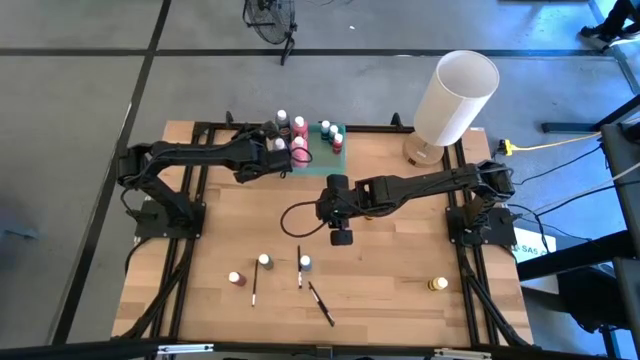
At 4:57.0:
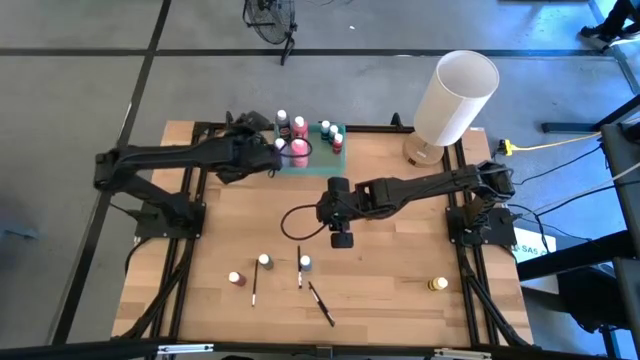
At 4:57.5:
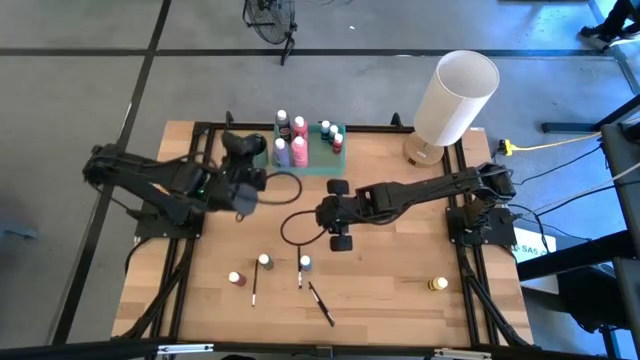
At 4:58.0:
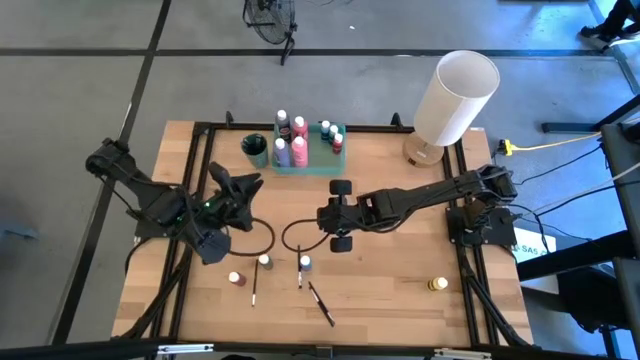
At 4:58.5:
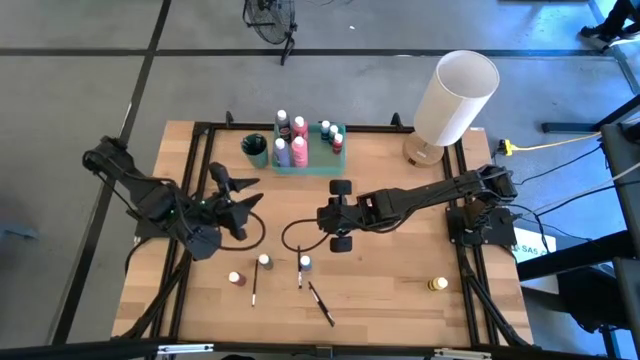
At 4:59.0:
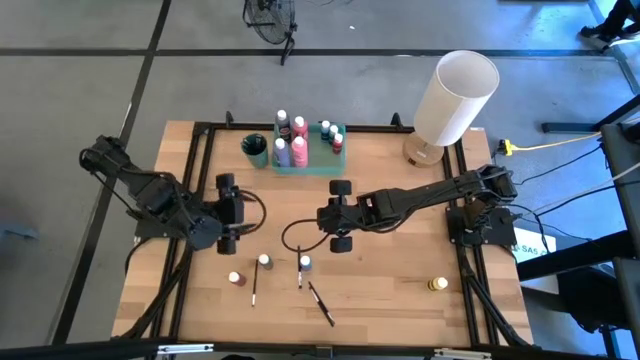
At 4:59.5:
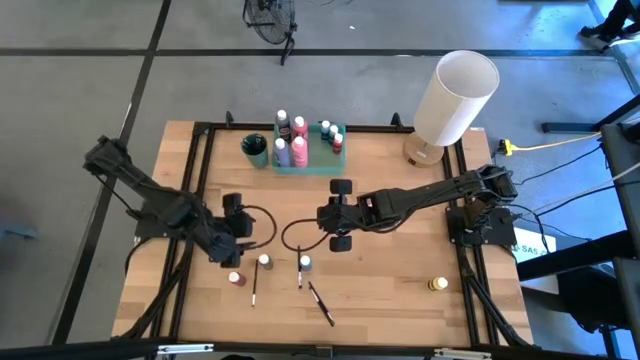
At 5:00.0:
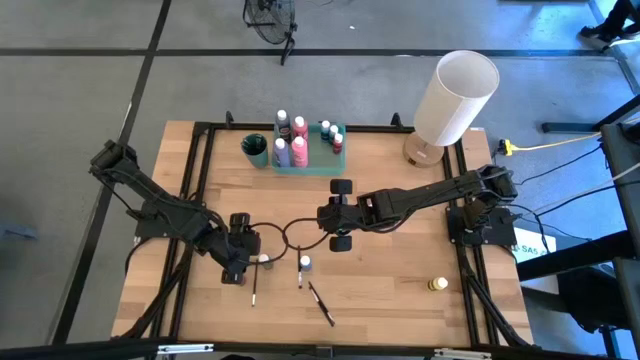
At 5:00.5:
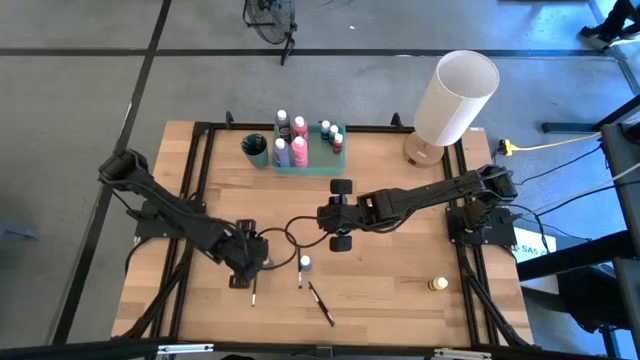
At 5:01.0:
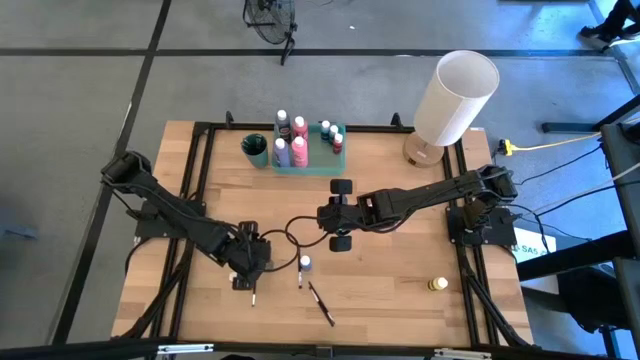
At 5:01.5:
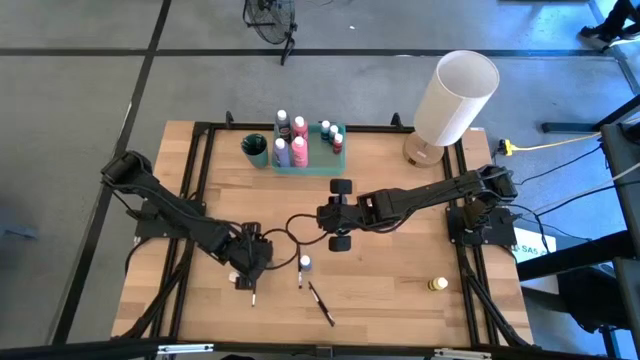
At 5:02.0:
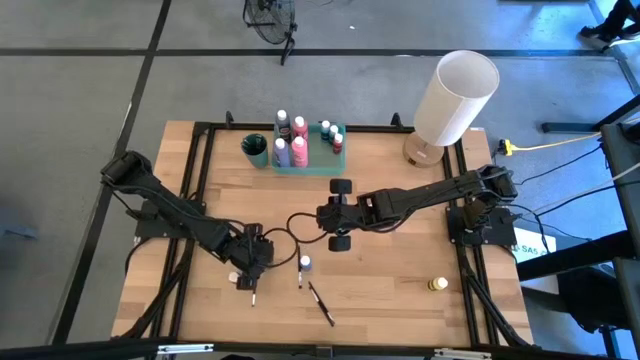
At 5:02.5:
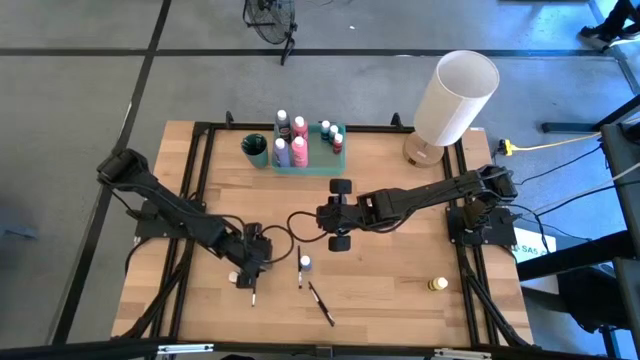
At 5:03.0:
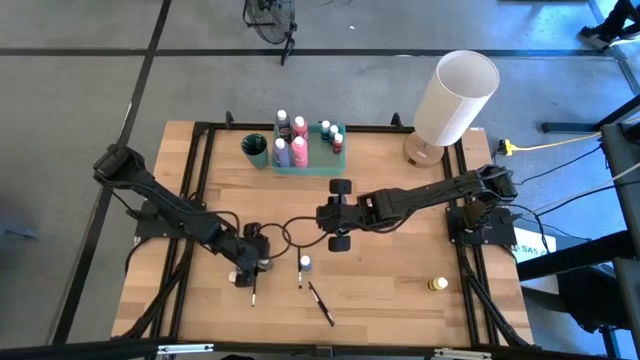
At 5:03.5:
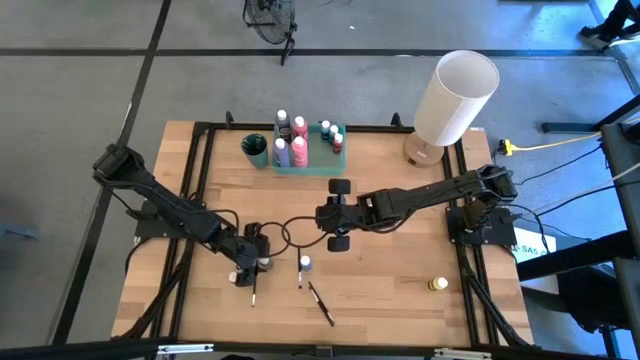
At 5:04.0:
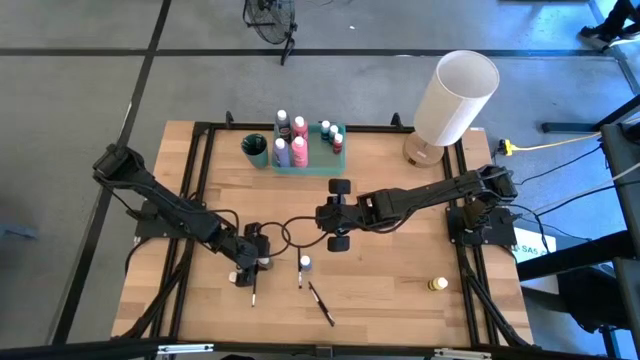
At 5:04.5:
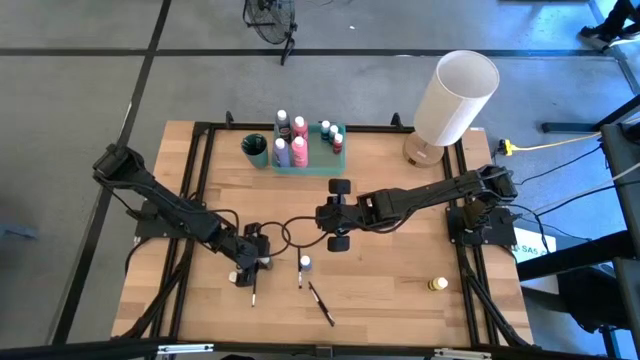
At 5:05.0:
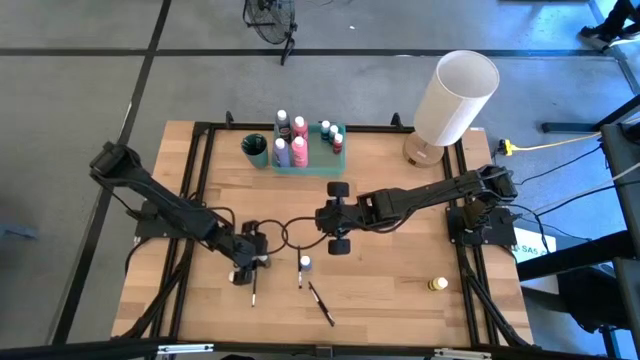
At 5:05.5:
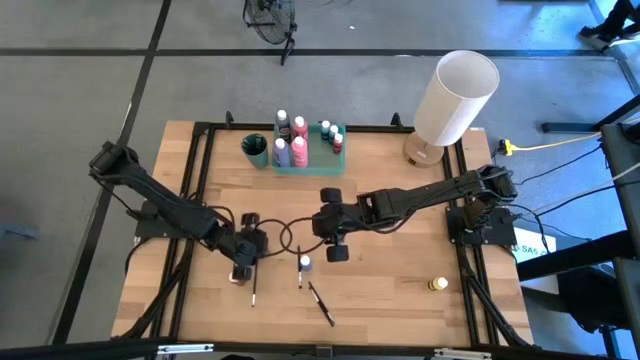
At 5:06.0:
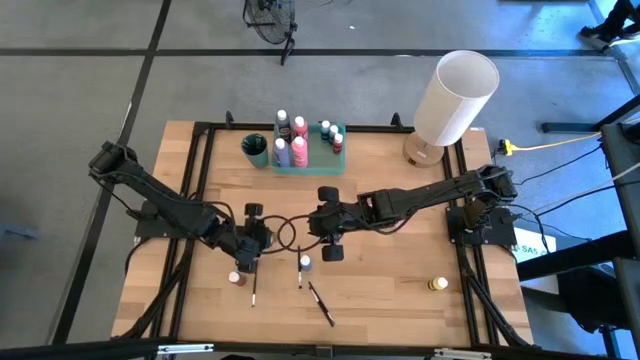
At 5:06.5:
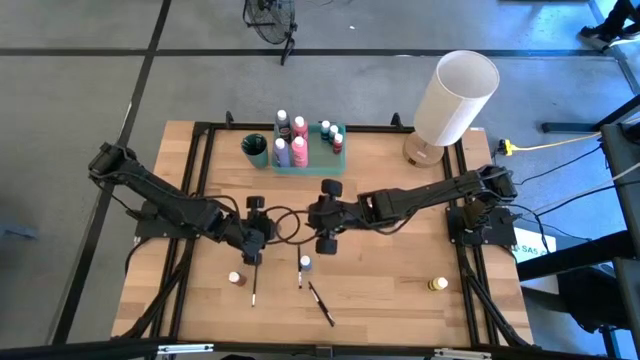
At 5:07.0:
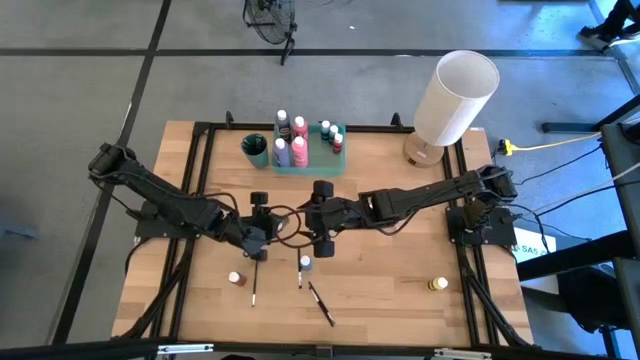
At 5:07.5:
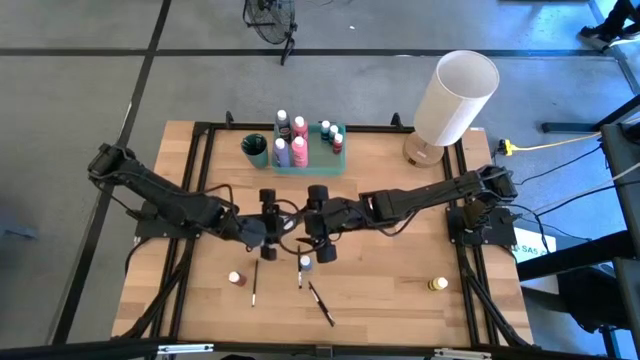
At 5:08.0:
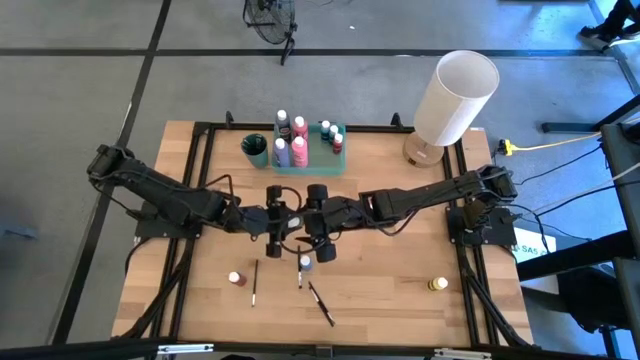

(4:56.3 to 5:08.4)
Task: Pick & Place Paint Supplies
Put the small green paint bottle into the green bin

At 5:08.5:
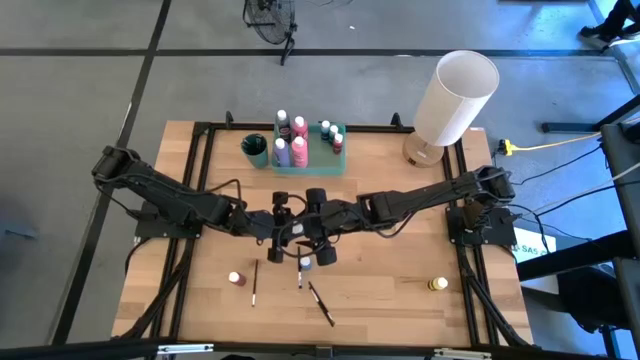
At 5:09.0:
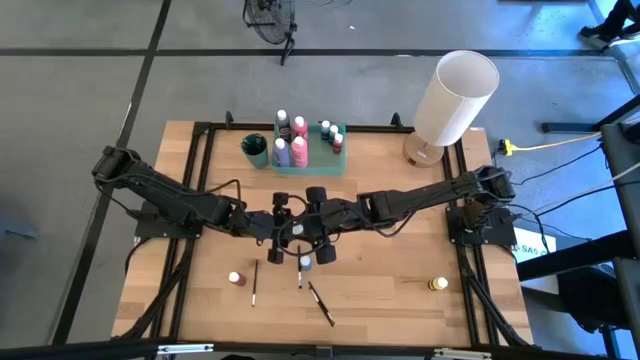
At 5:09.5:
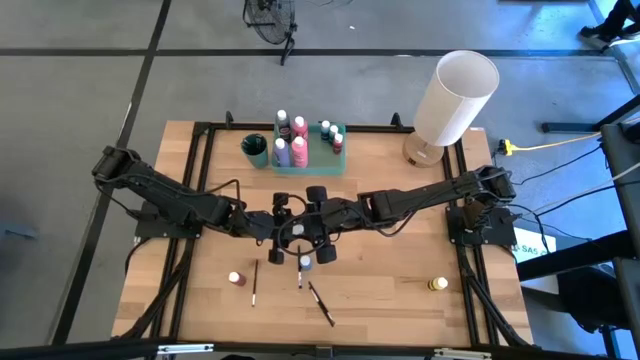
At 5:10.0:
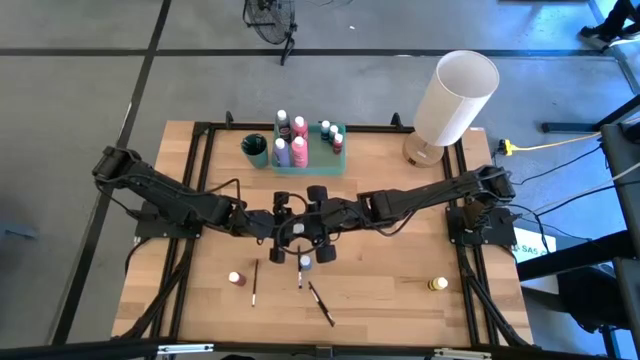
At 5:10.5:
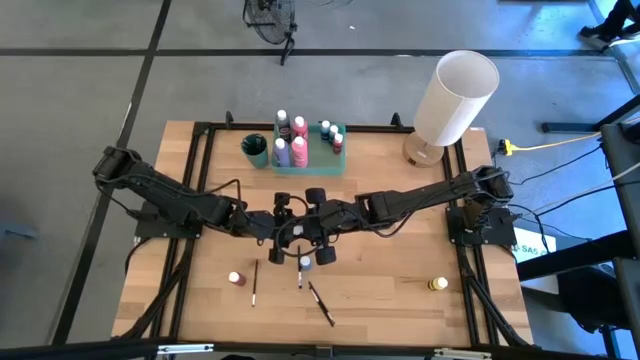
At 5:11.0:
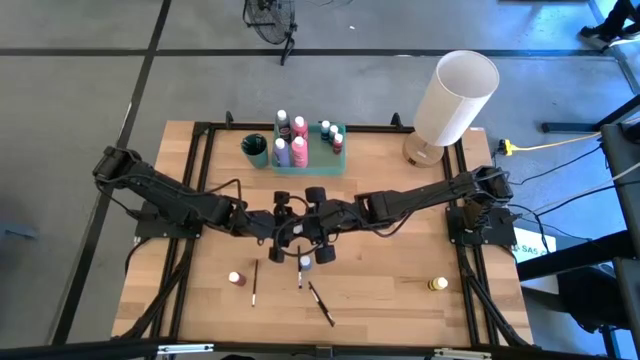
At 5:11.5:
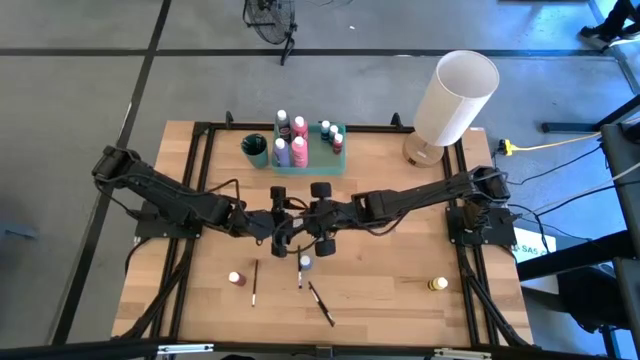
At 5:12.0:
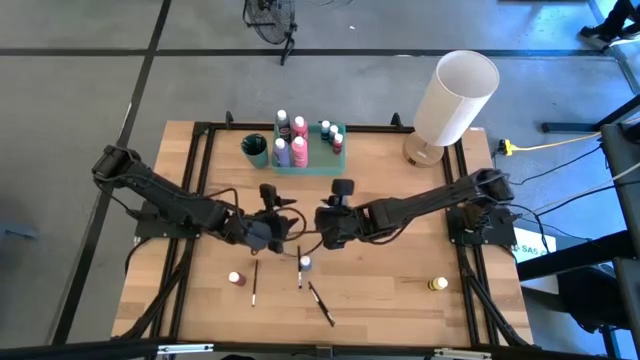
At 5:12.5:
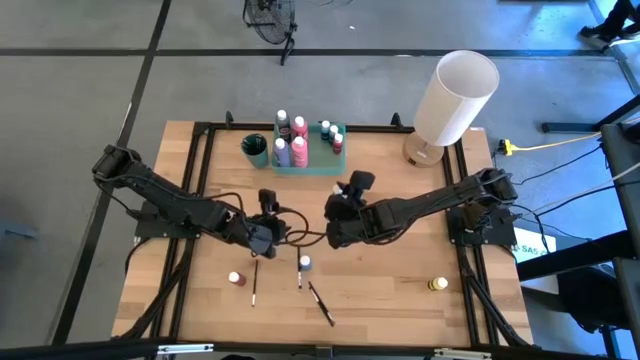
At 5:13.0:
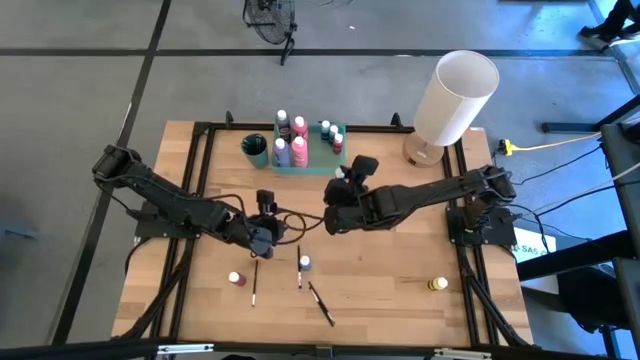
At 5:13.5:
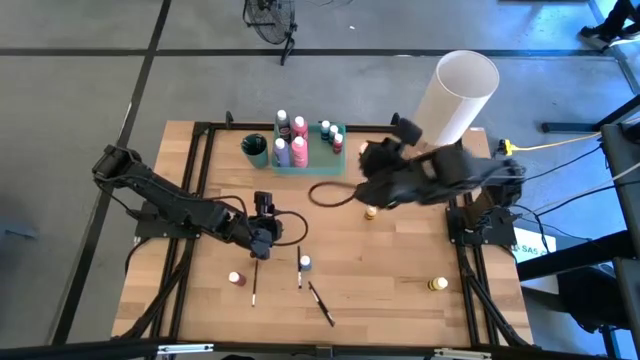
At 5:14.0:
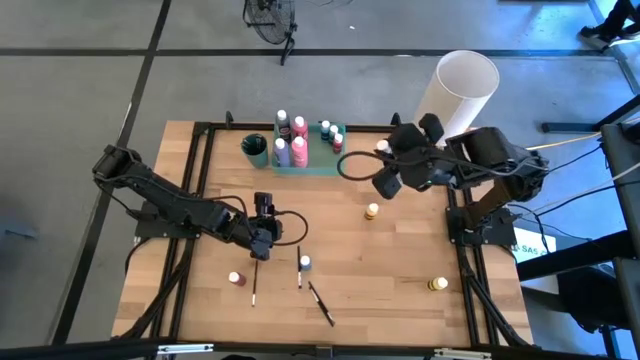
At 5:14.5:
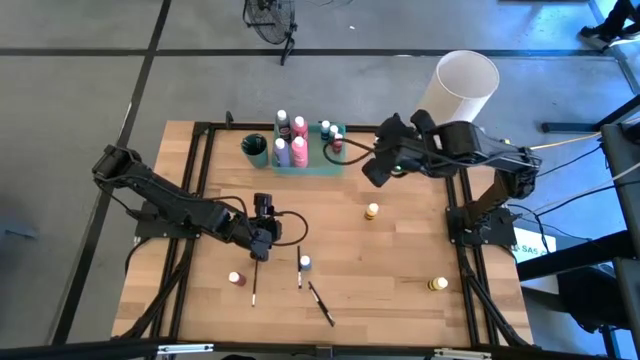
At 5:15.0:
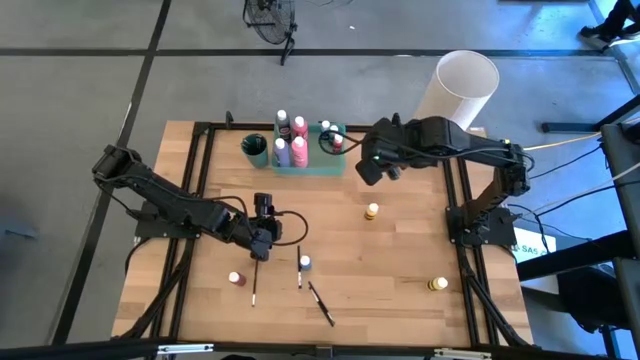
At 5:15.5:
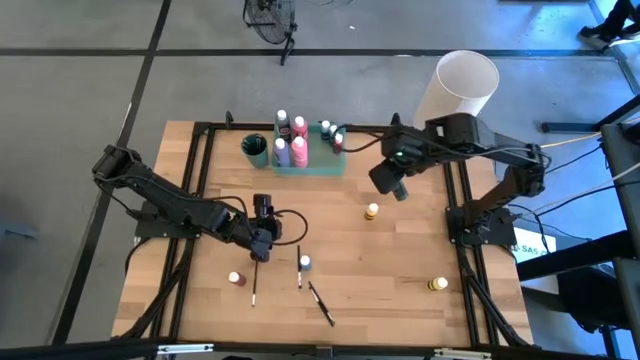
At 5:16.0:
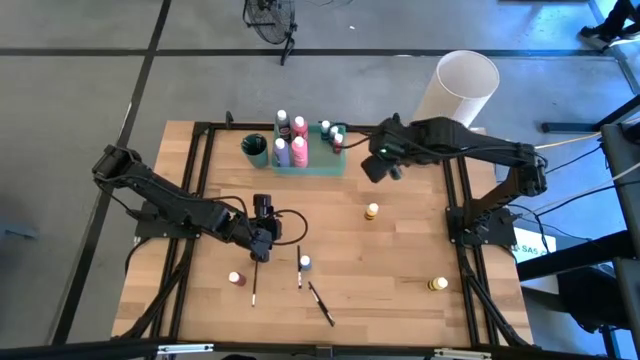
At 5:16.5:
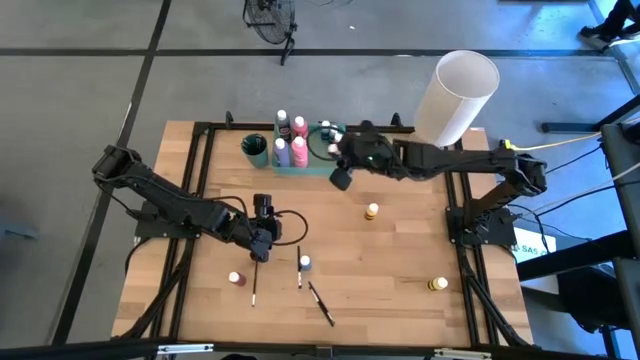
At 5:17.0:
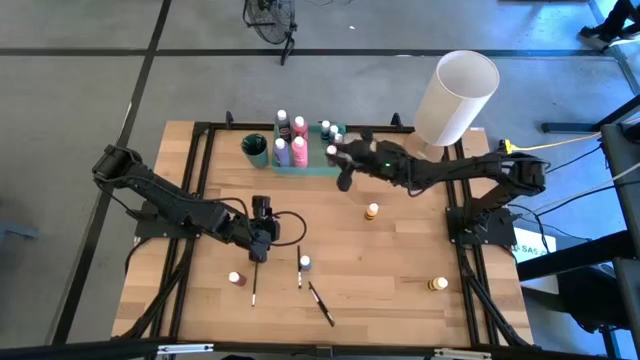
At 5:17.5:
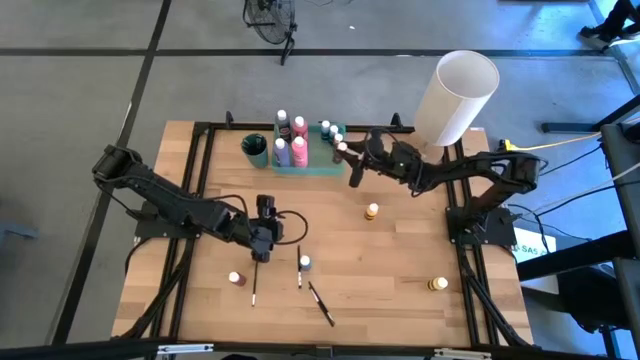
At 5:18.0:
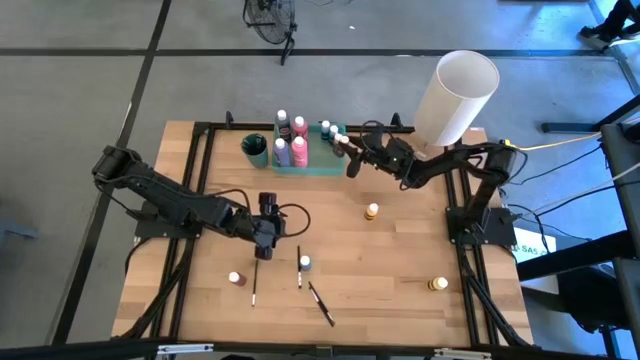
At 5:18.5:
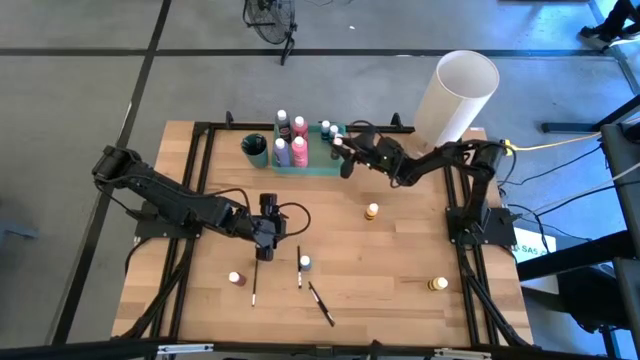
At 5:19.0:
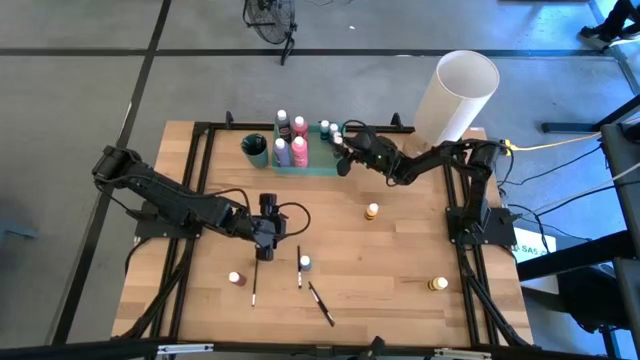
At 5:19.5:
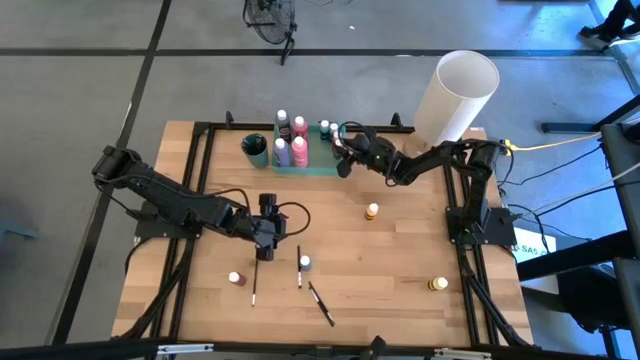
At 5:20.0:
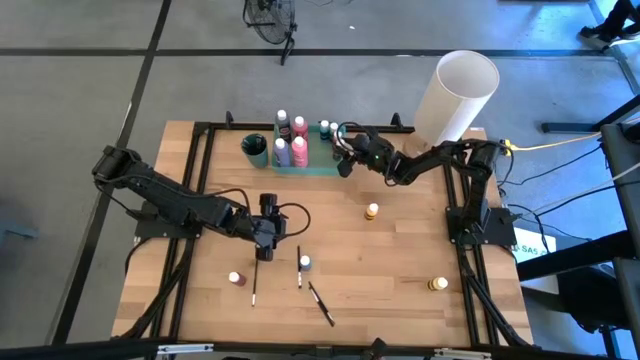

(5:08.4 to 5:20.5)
Put the small green paint bottle into the green bin
